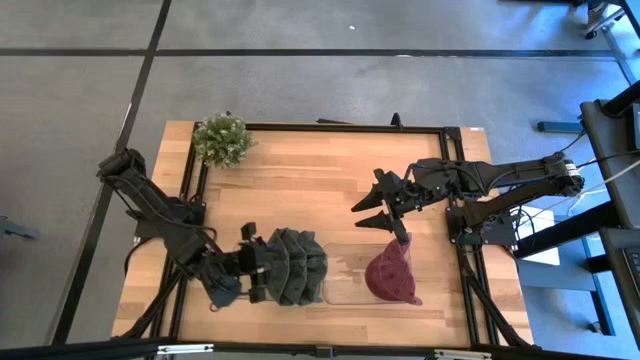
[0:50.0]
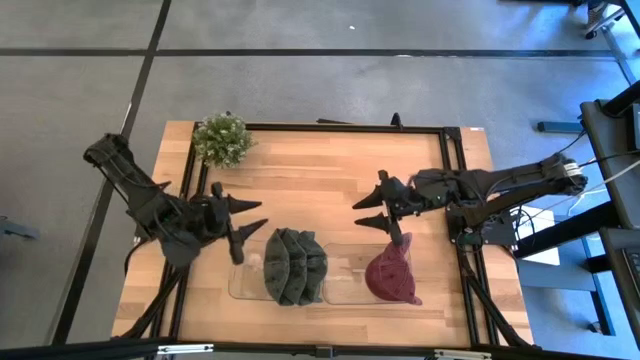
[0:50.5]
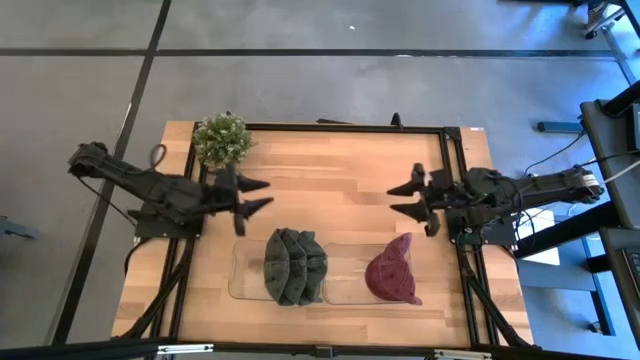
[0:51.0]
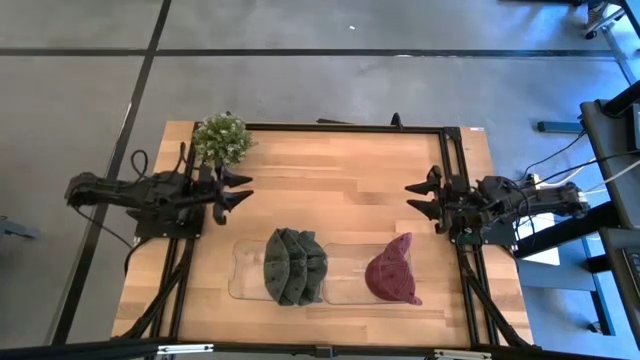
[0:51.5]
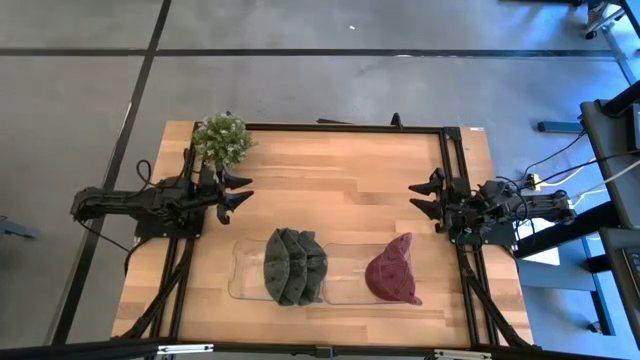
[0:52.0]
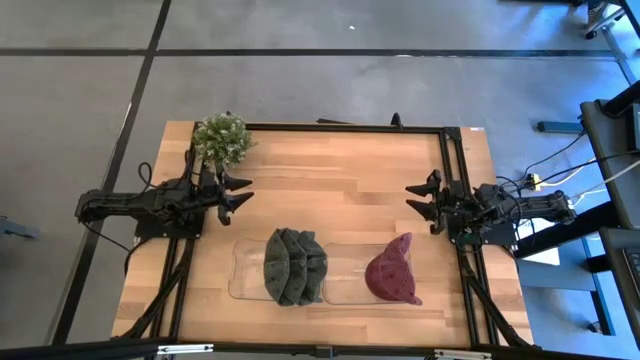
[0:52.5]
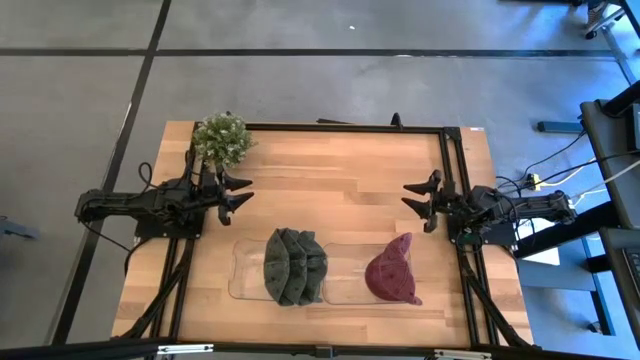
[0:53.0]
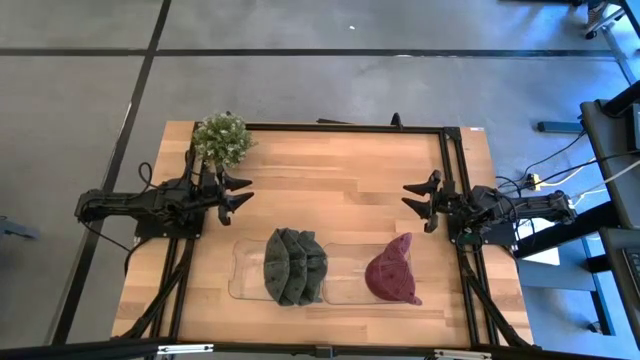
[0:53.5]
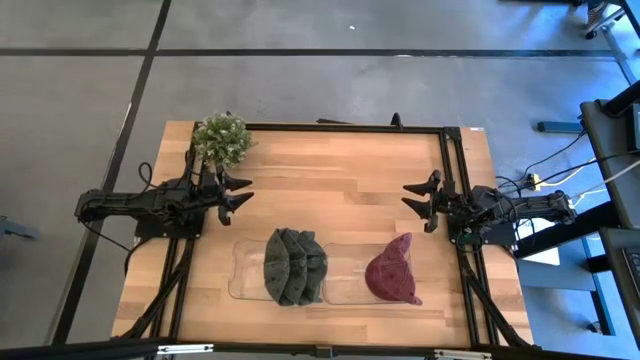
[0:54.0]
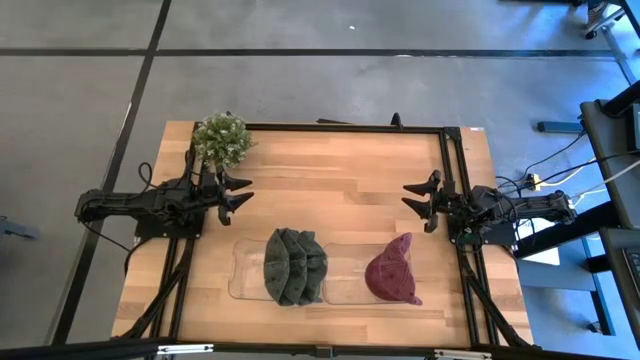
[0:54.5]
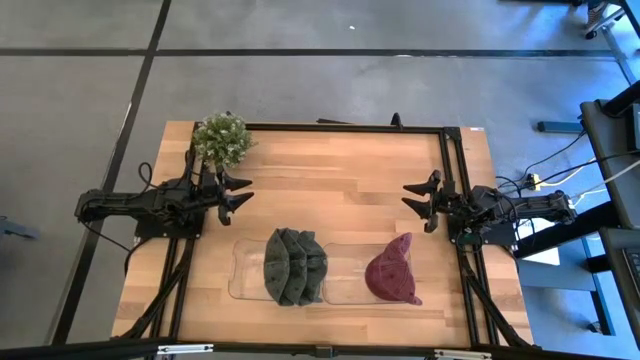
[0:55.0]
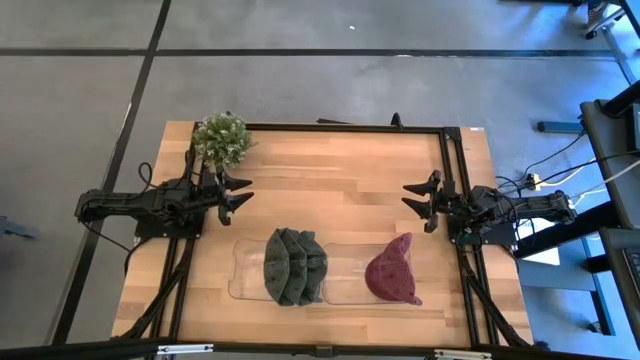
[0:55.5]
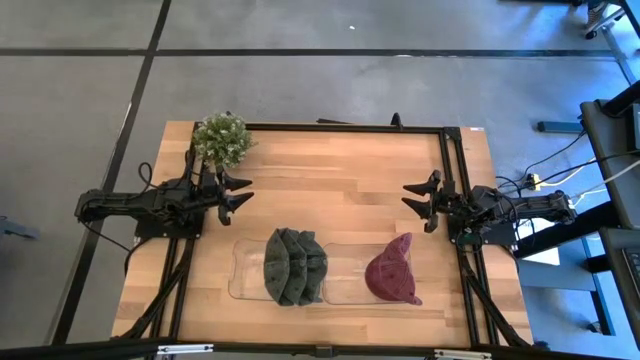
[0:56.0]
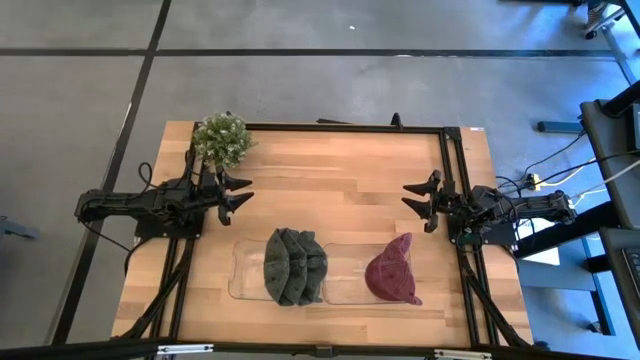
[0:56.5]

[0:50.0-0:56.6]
Task: Pick & Place hat
Return to Home Position

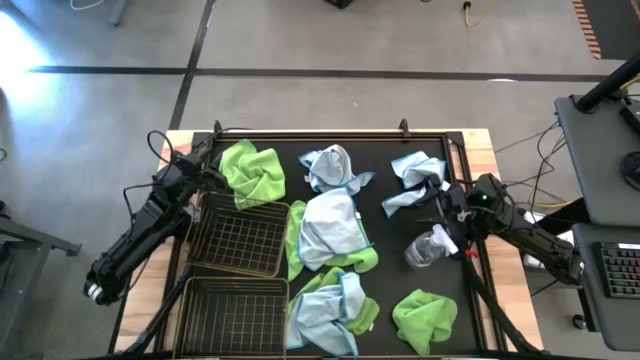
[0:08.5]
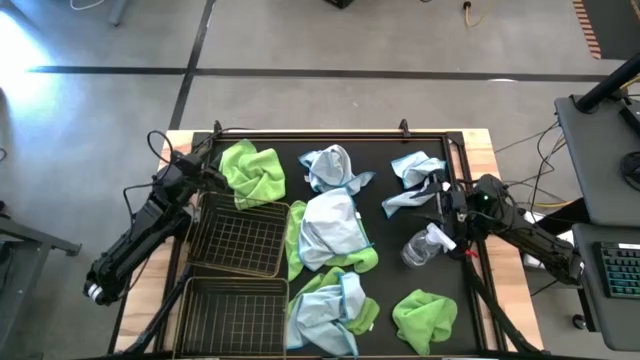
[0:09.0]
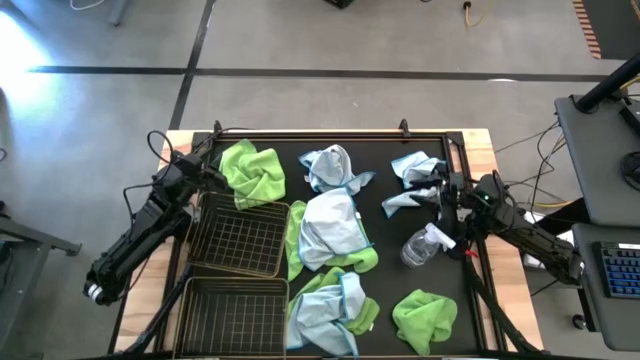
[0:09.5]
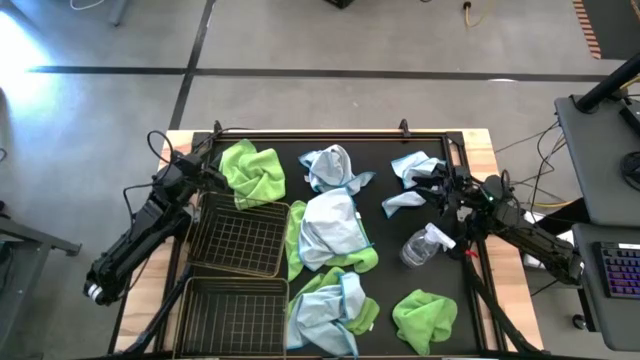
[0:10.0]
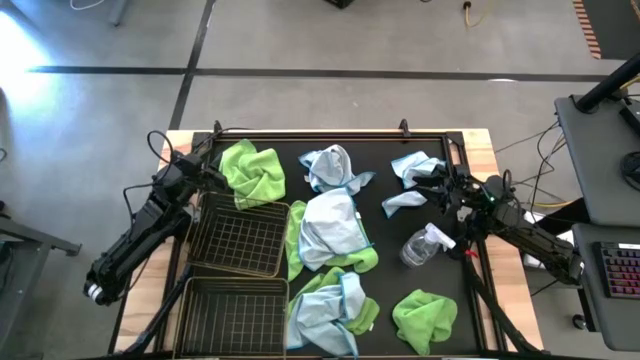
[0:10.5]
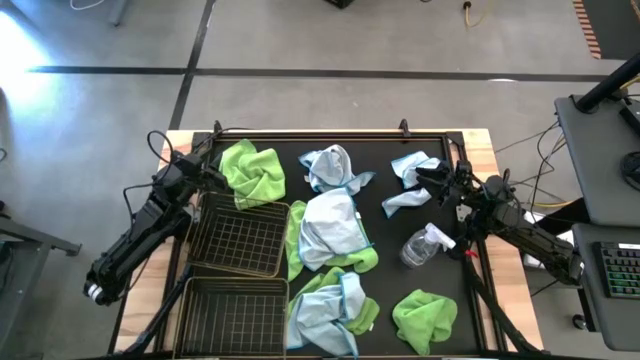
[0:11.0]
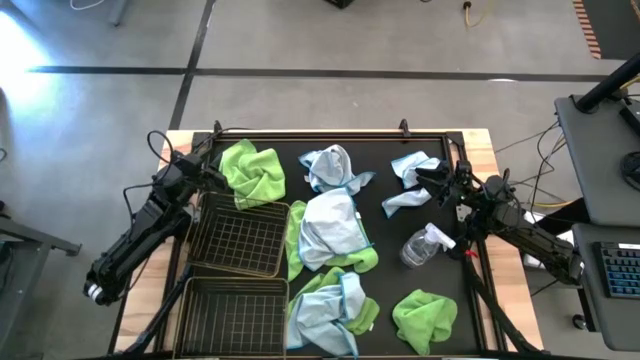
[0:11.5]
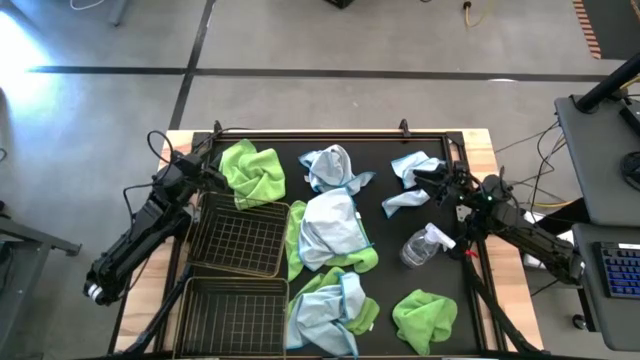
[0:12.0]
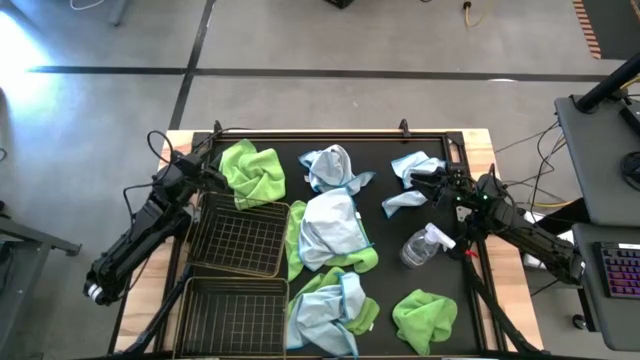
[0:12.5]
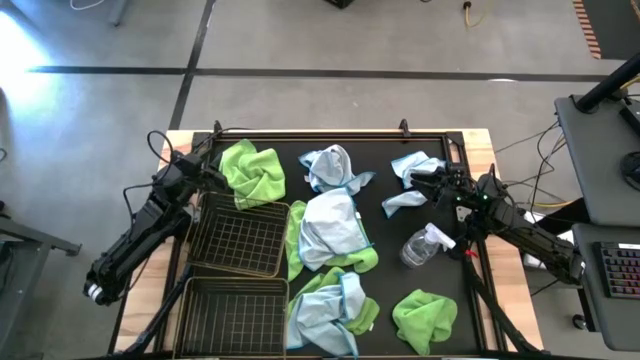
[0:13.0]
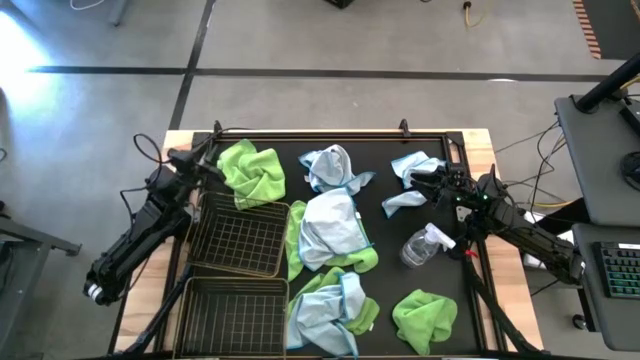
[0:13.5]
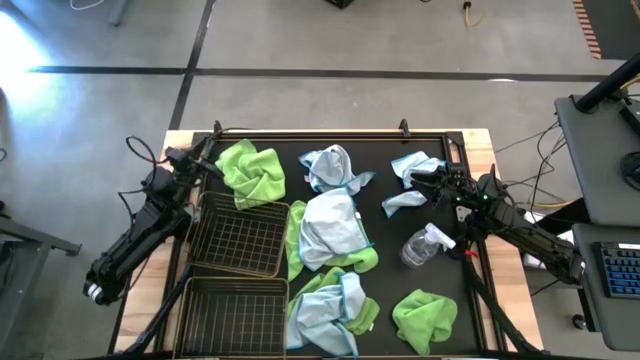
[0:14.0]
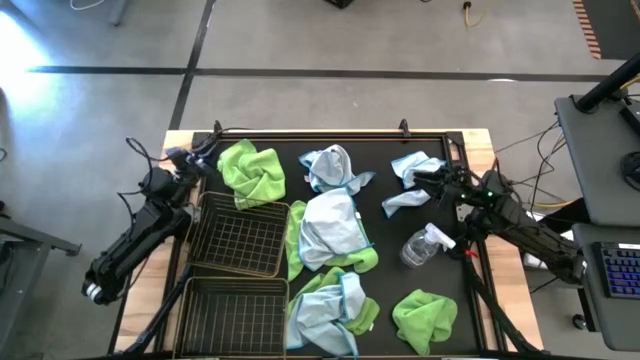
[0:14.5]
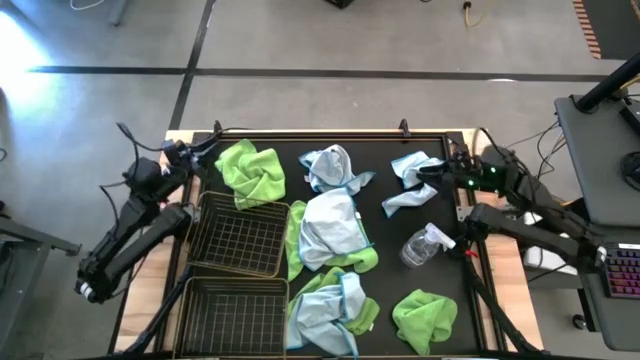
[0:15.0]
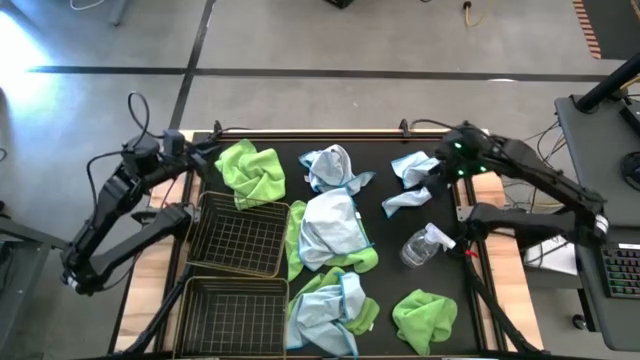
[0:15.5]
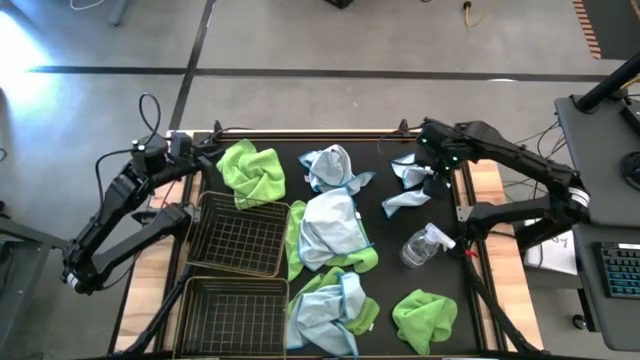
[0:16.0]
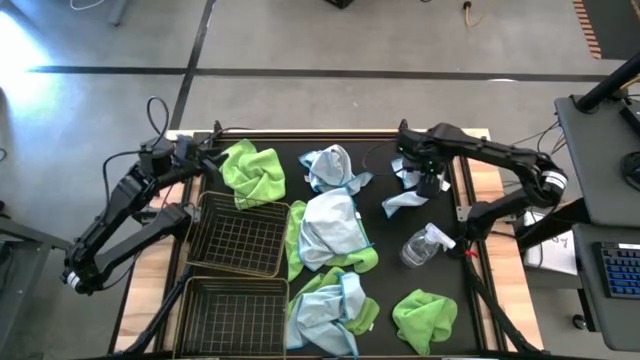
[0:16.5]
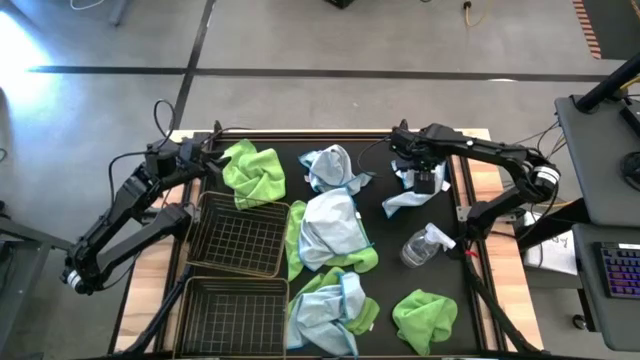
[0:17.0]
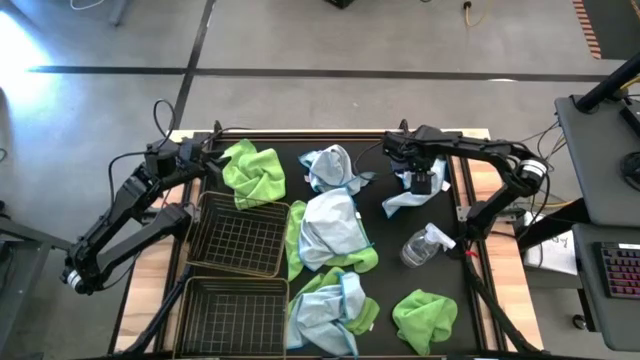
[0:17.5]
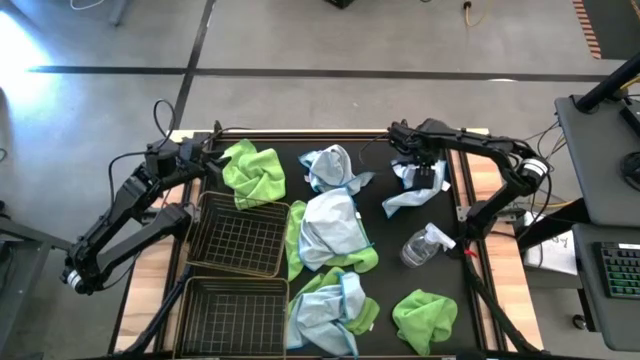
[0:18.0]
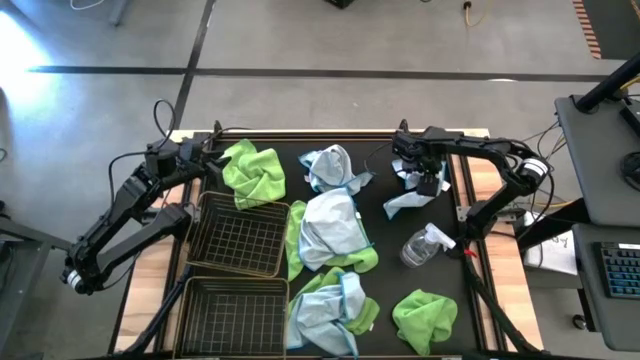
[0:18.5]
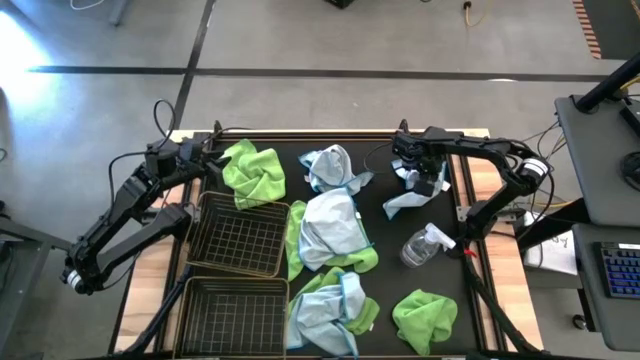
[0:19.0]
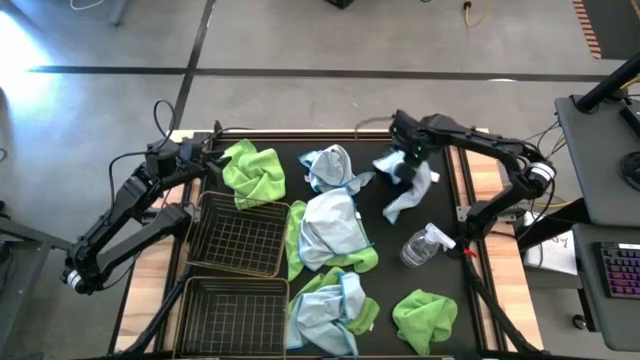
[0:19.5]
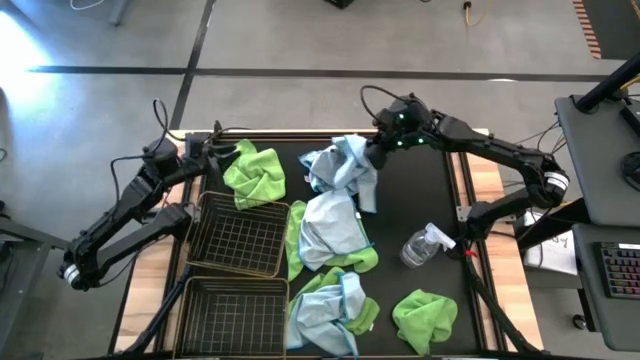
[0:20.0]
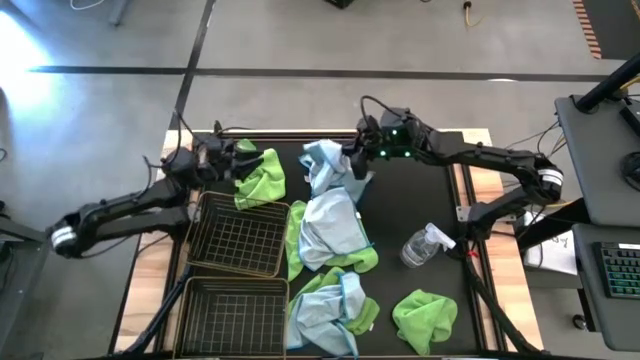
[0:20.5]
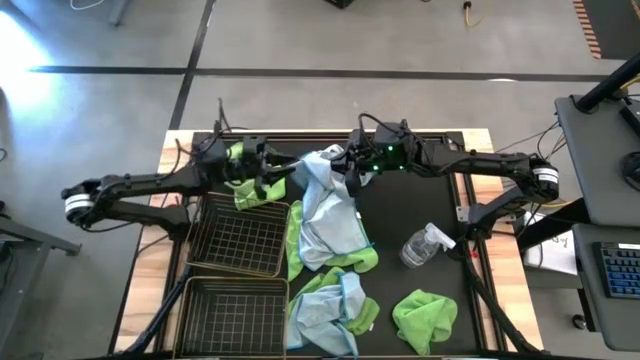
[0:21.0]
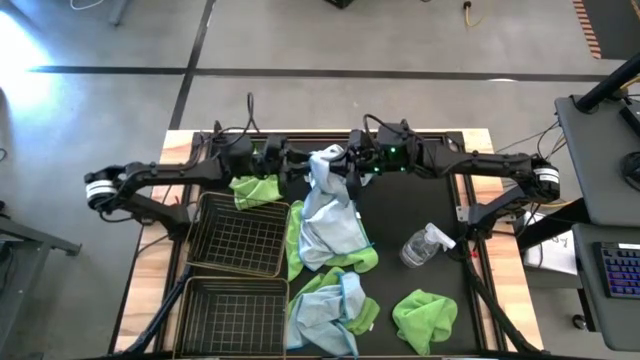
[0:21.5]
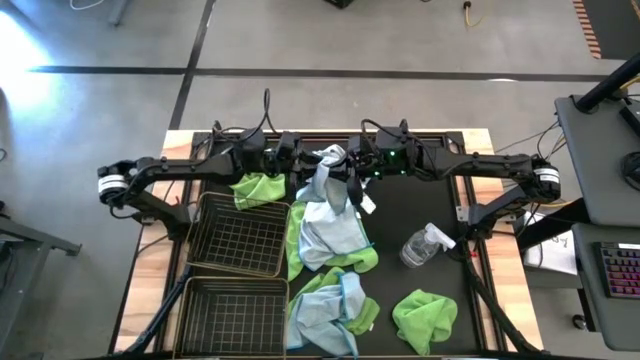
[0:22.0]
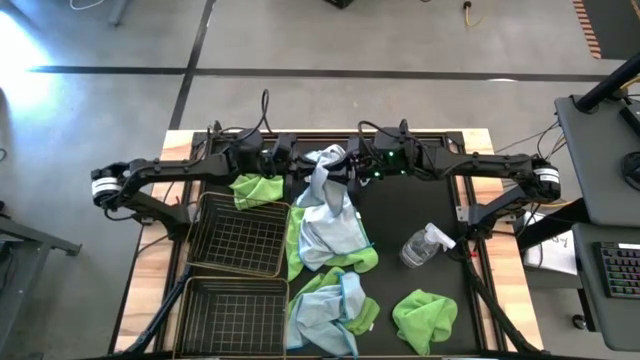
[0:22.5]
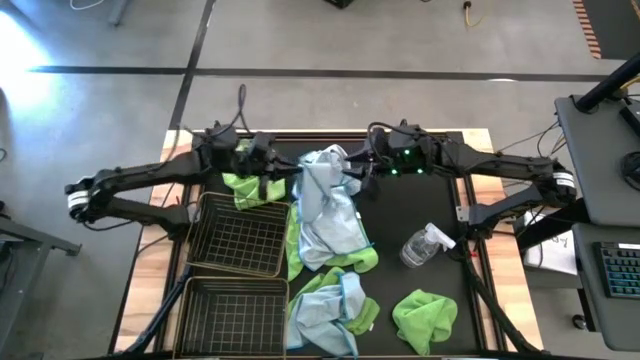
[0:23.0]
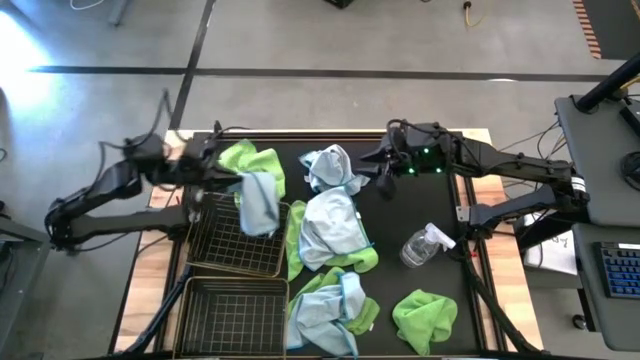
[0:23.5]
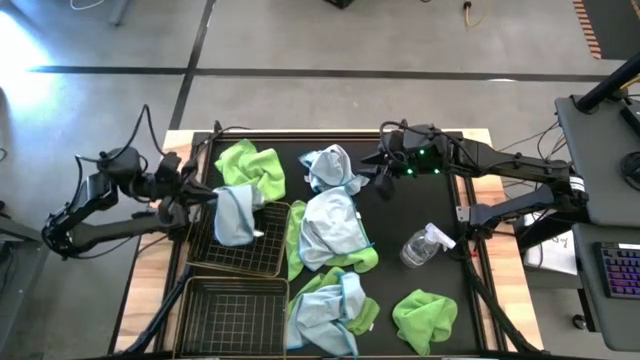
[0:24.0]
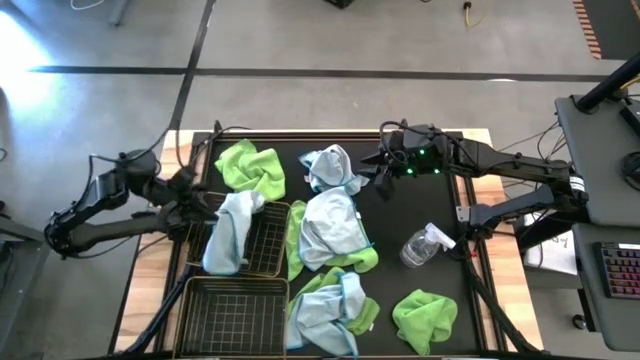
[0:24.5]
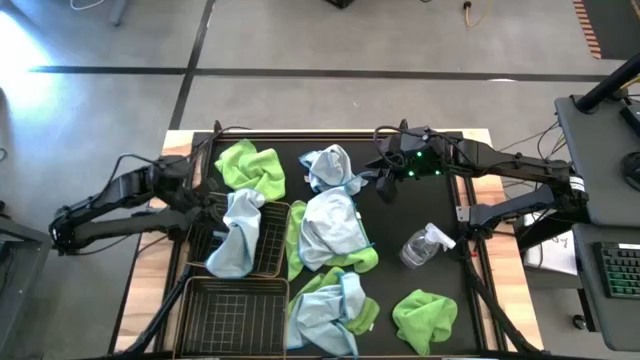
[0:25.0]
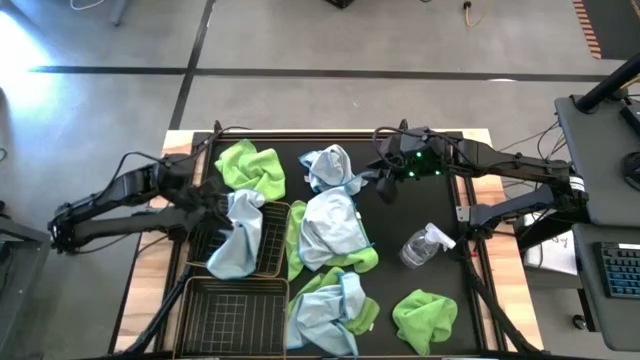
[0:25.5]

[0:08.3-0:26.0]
Task: Sort microfiber towel by color & place in baskets
Put the top right light blue towel into the top wire basket
